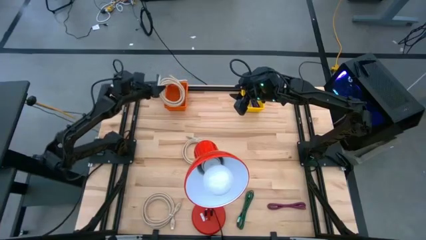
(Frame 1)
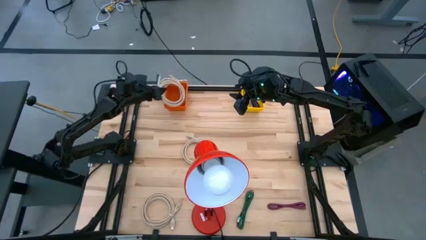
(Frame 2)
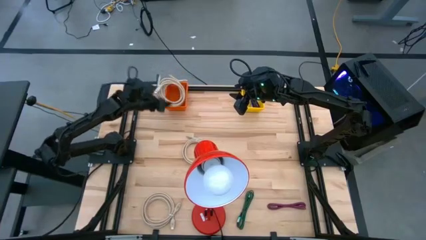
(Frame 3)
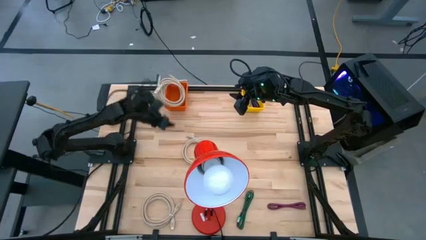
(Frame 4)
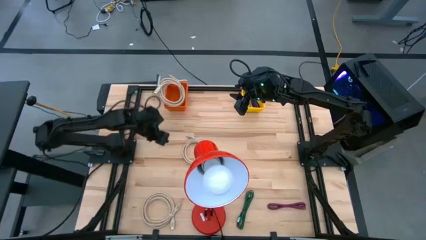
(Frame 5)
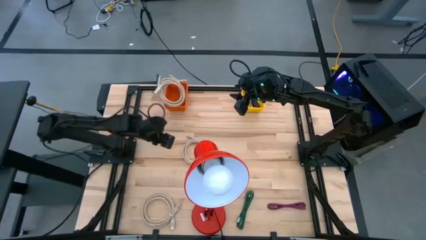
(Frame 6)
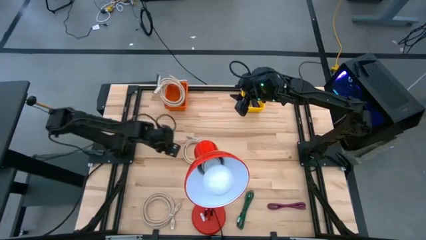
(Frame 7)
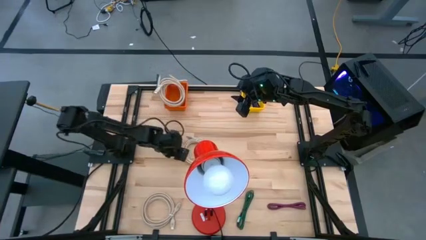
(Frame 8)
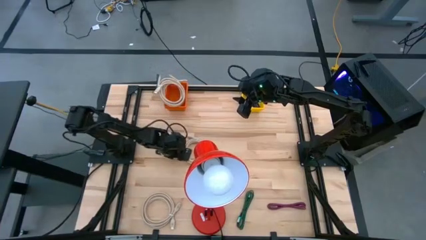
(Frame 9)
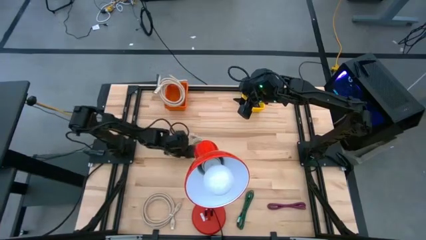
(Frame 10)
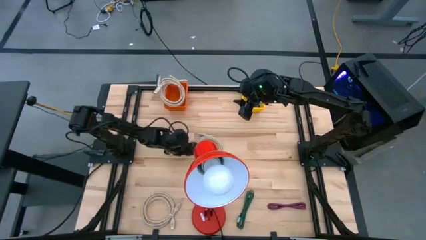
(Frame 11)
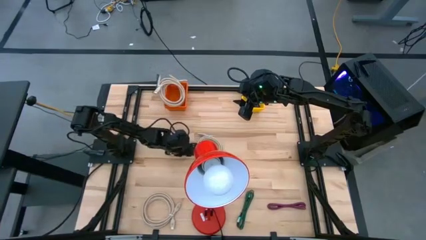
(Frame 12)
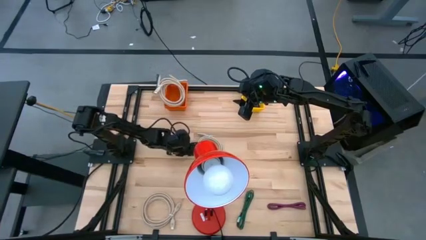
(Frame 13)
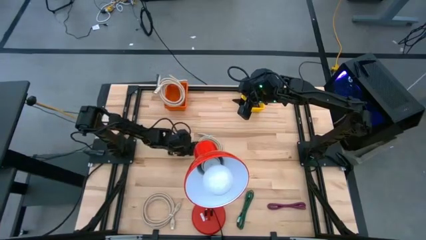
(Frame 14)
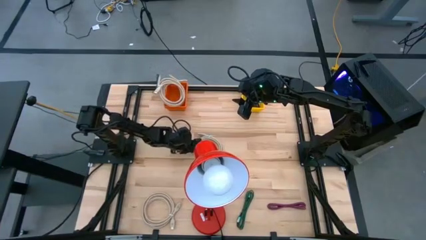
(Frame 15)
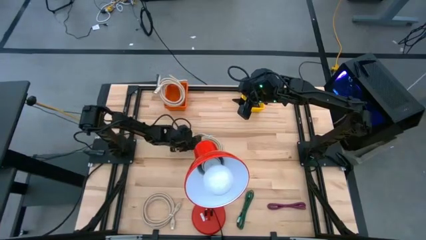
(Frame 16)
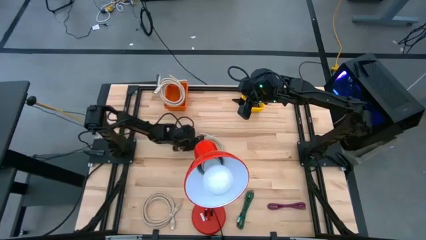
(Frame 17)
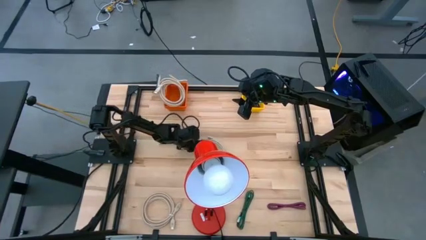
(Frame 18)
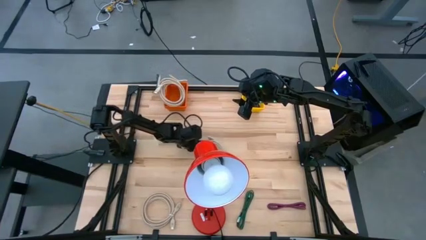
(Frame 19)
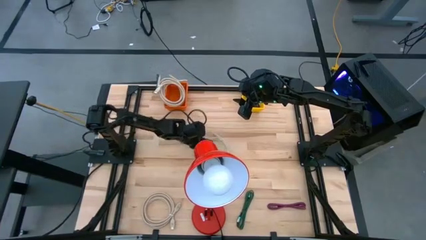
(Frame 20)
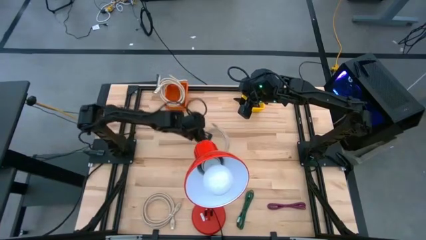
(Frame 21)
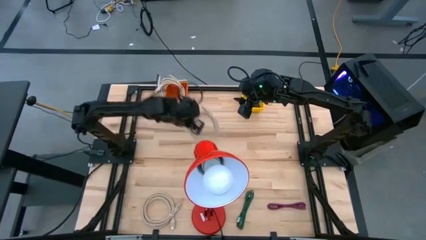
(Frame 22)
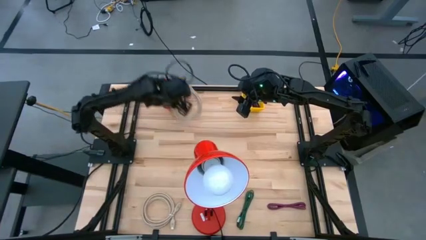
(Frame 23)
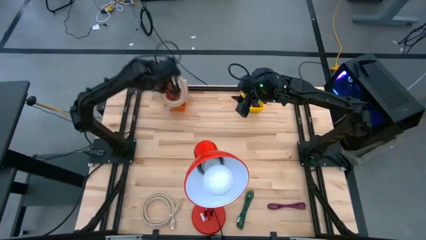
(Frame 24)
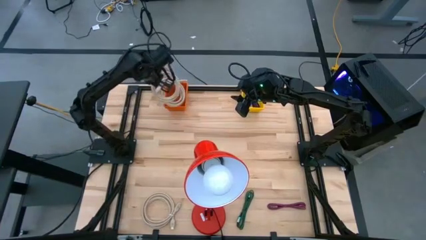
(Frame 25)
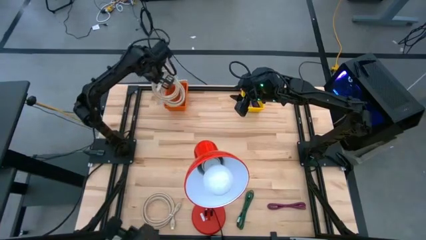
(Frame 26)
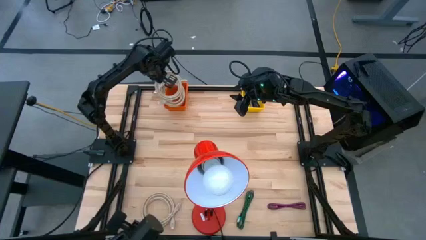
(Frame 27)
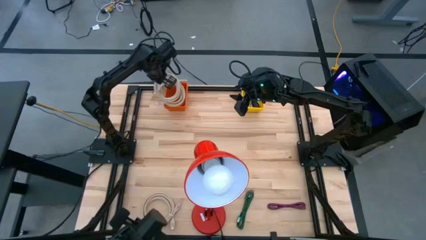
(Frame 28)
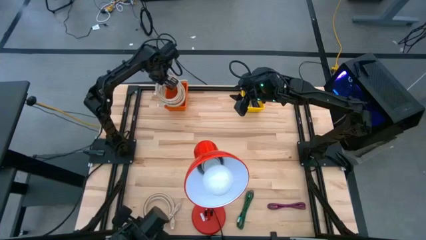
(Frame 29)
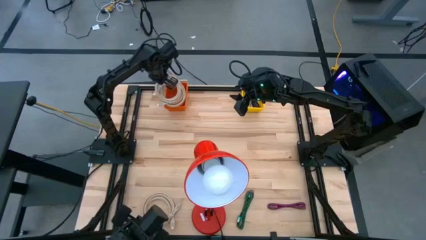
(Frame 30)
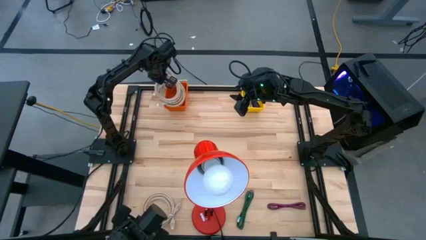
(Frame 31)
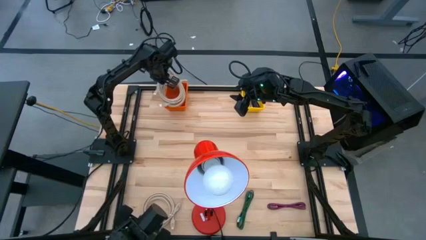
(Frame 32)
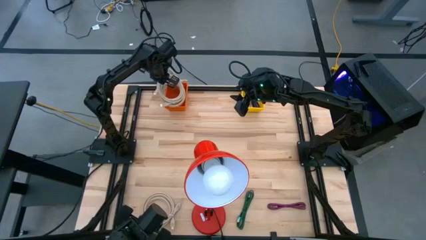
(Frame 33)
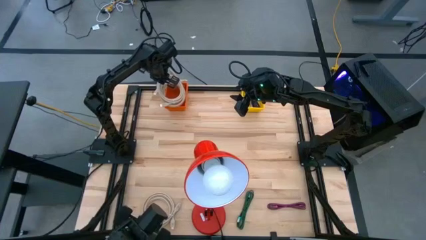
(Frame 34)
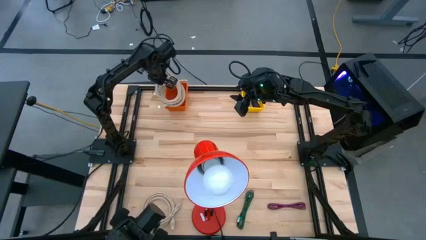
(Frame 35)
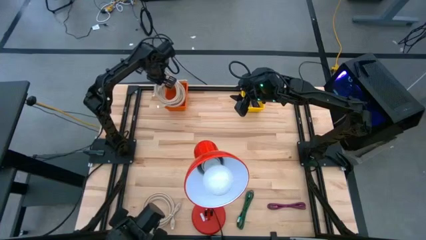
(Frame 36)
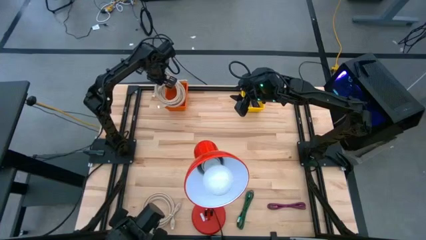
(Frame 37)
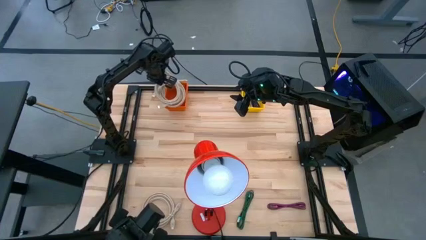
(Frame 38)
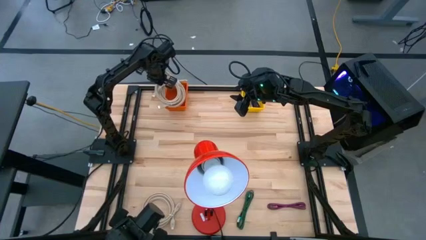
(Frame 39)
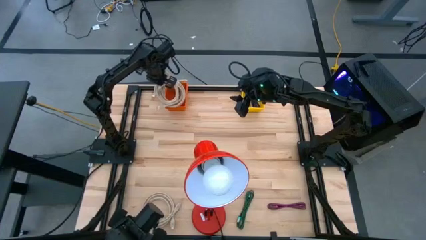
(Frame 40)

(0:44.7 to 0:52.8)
Task: Pick & Place USB Port
Put the brown HDMI cable into the orange bin

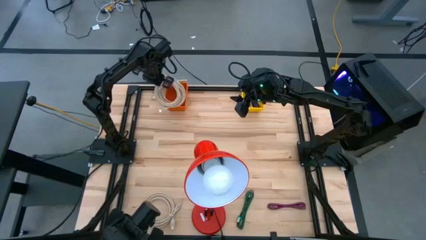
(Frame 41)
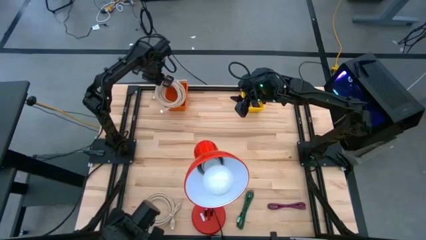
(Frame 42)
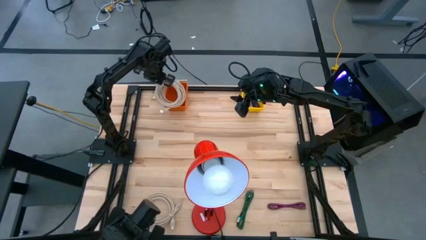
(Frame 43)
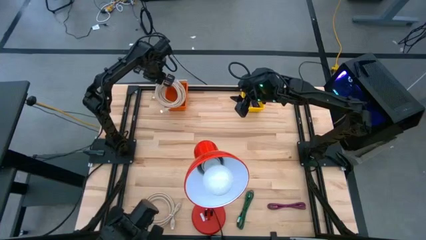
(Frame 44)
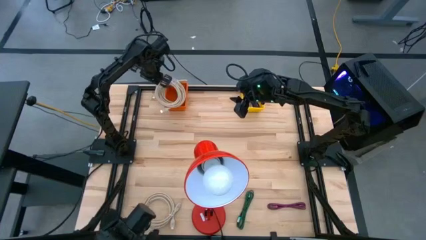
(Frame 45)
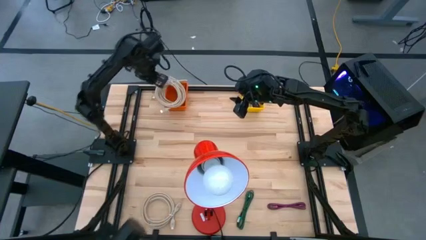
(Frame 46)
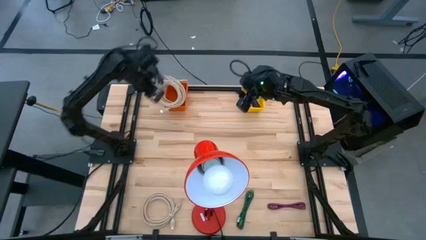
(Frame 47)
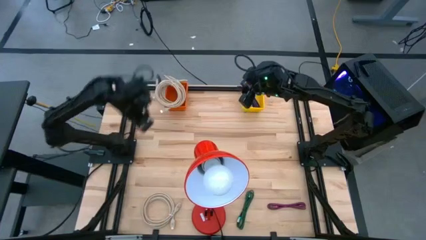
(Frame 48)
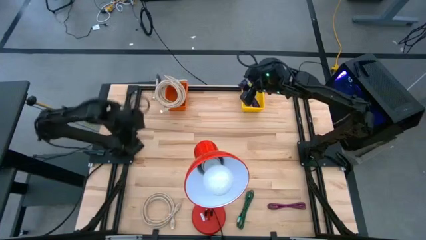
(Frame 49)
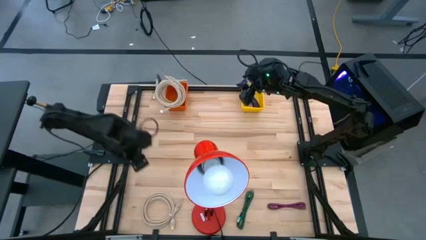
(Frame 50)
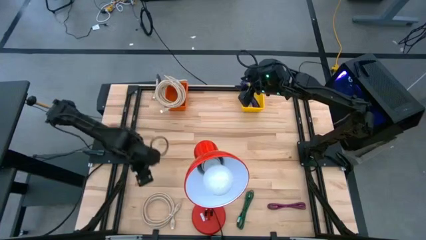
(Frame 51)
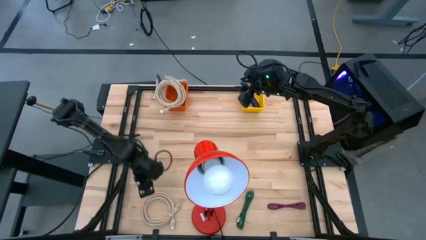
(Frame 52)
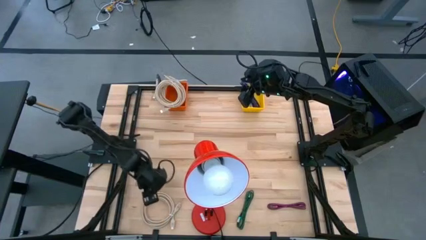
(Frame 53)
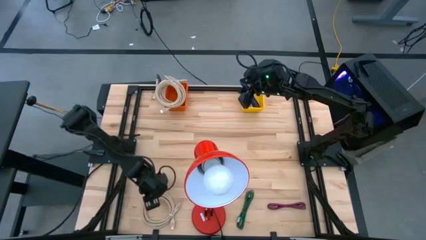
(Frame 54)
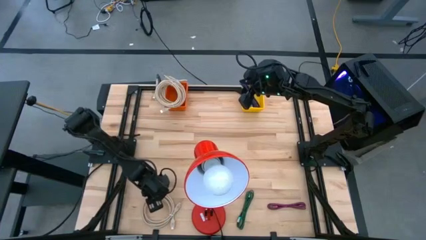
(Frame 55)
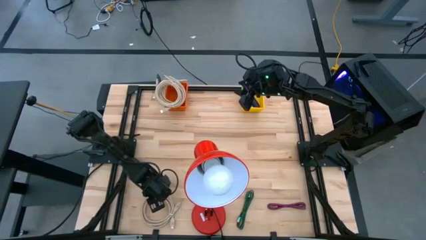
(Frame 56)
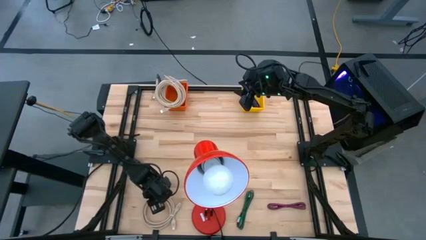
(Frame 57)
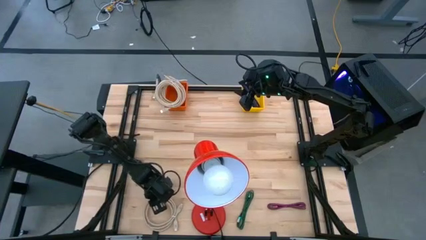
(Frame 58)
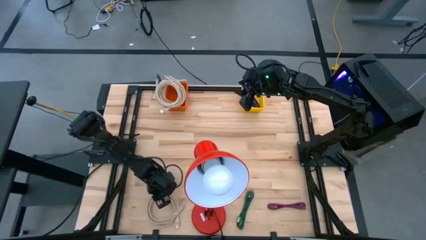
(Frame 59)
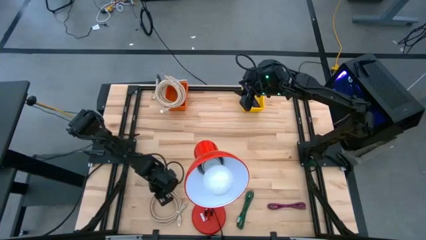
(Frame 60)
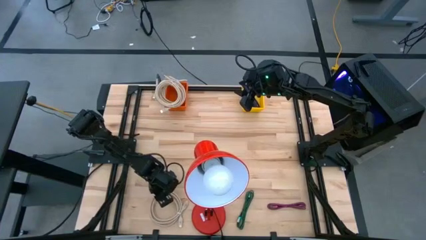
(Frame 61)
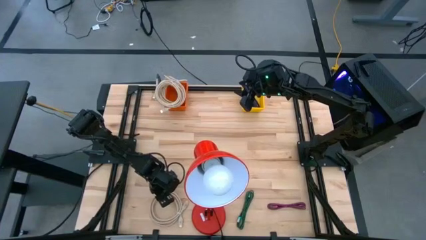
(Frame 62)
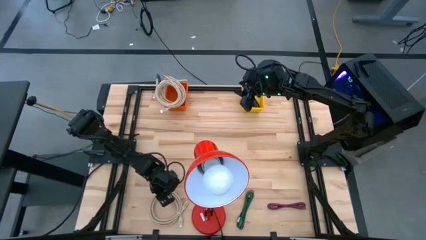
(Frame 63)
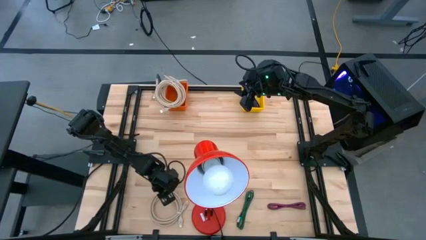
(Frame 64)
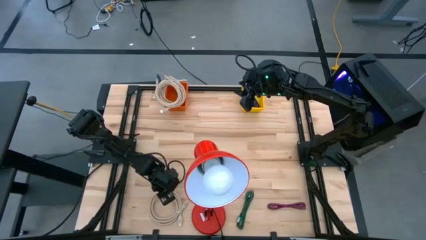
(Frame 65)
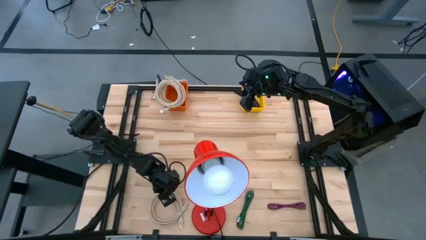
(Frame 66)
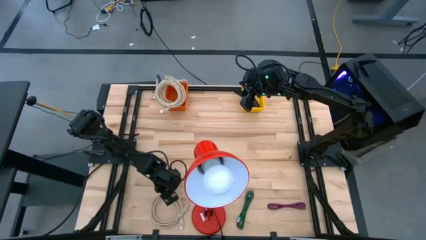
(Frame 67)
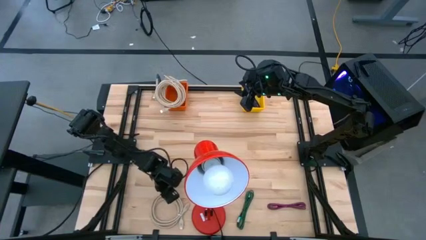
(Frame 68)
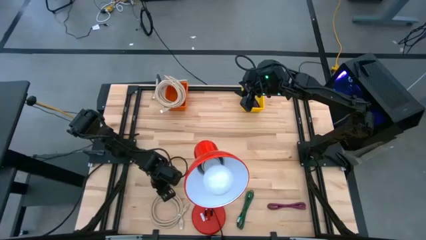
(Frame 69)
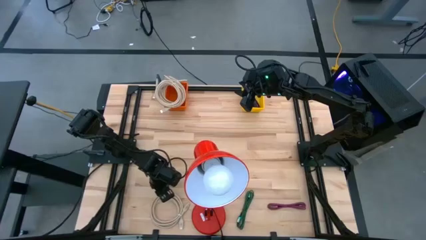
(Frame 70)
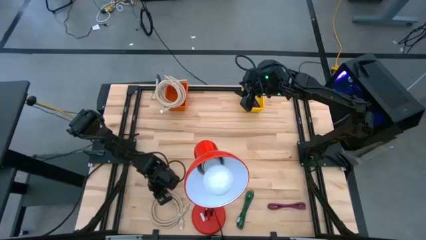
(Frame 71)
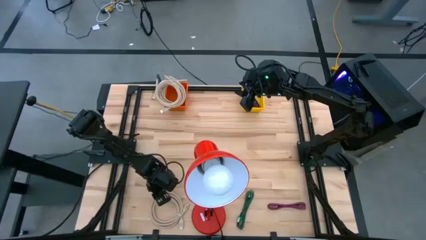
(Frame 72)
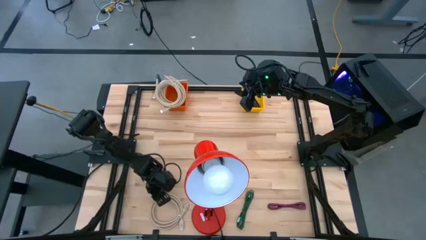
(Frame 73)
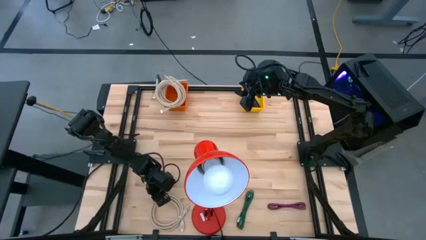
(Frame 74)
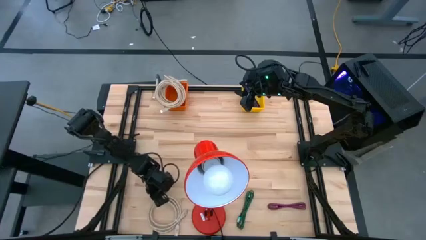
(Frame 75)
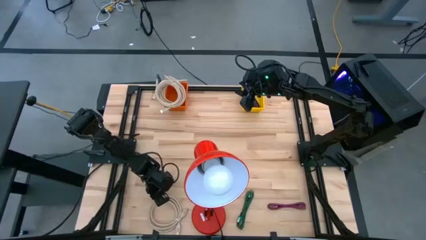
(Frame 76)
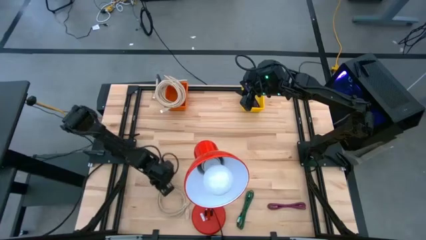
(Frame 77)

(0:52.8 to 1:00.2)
Put the brown HDMI cable into the orange bin
